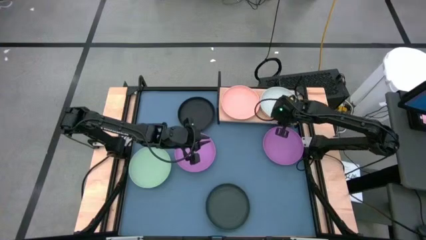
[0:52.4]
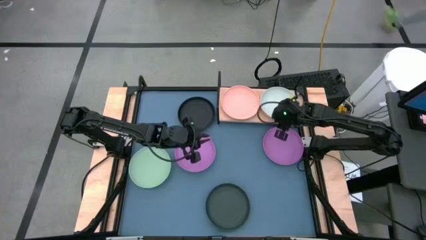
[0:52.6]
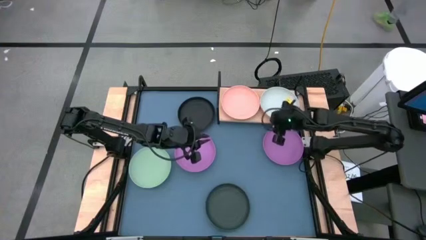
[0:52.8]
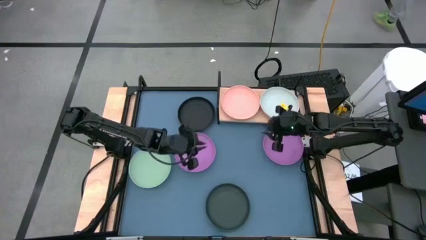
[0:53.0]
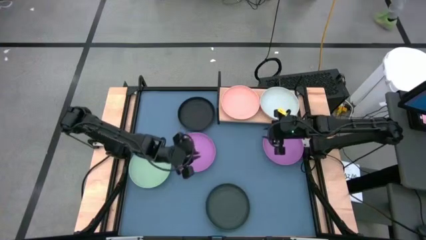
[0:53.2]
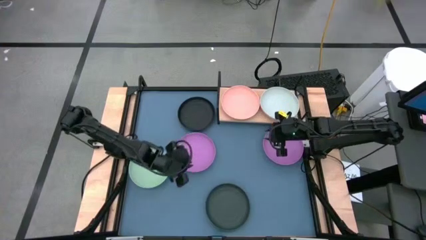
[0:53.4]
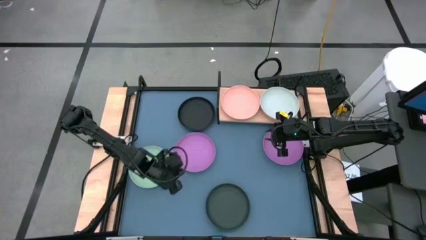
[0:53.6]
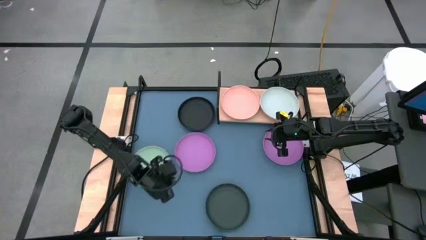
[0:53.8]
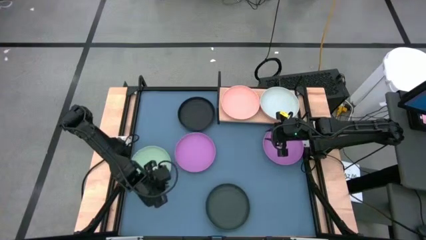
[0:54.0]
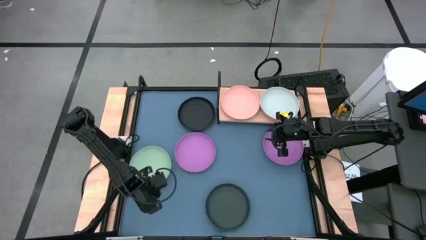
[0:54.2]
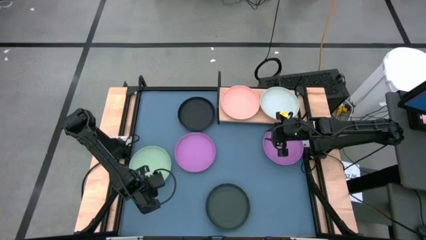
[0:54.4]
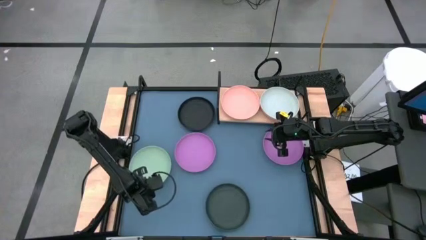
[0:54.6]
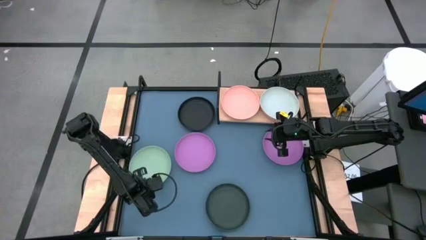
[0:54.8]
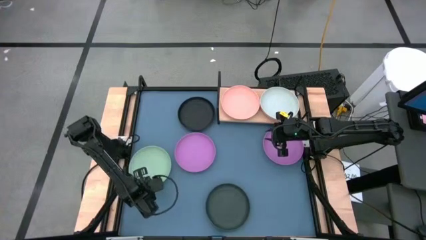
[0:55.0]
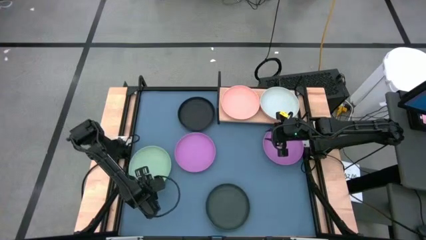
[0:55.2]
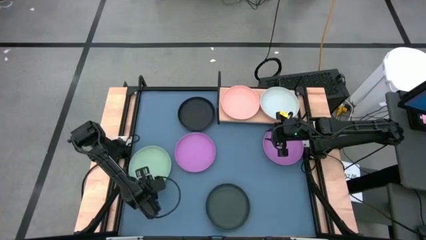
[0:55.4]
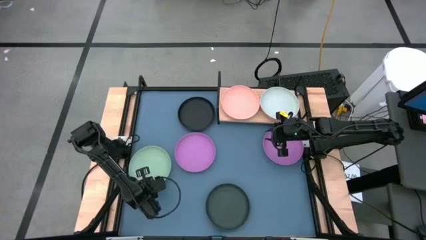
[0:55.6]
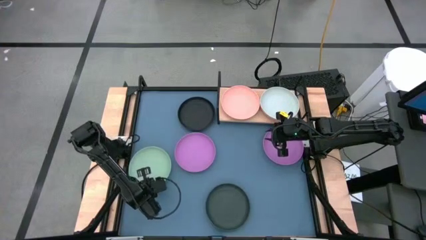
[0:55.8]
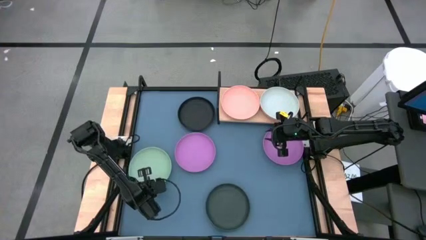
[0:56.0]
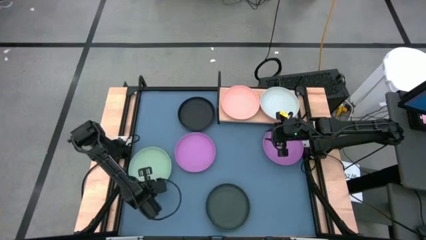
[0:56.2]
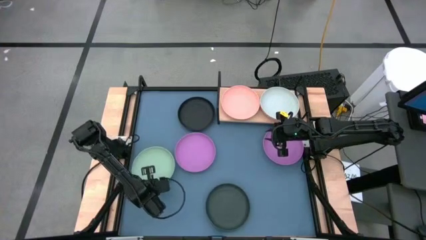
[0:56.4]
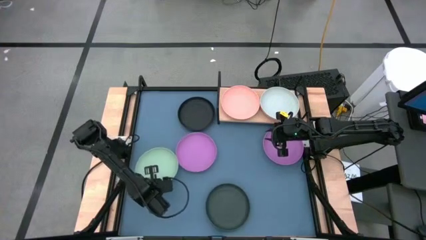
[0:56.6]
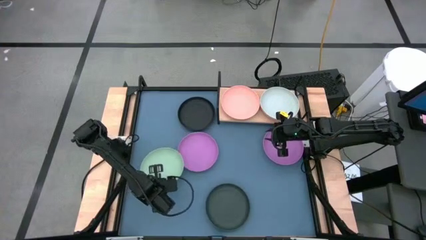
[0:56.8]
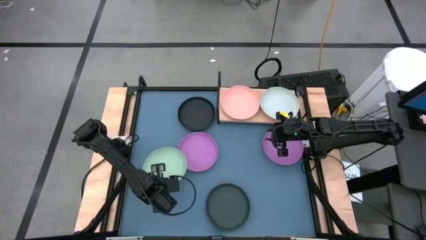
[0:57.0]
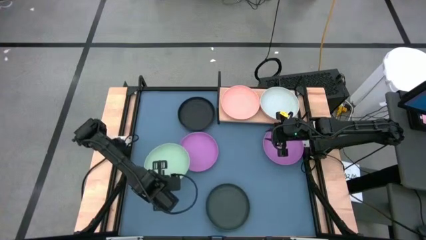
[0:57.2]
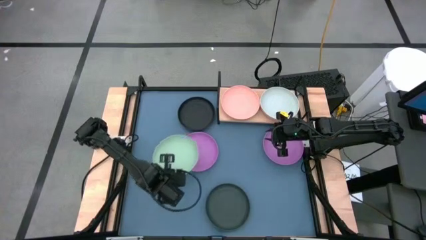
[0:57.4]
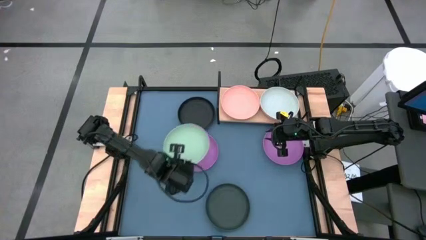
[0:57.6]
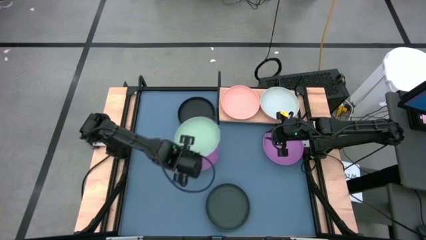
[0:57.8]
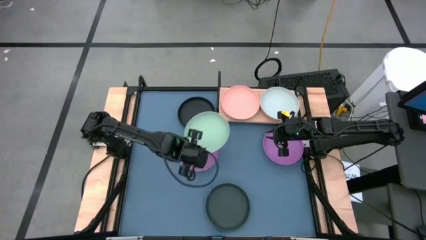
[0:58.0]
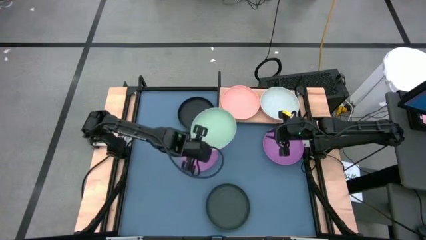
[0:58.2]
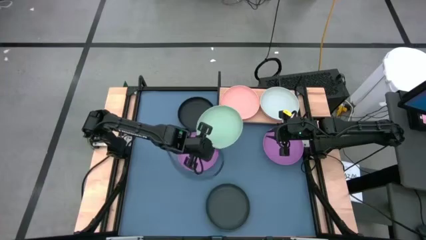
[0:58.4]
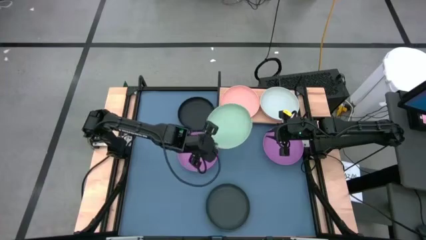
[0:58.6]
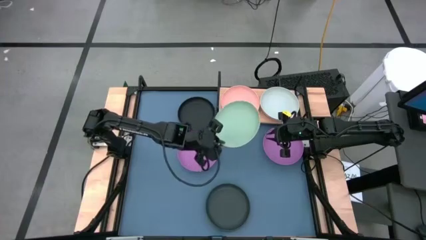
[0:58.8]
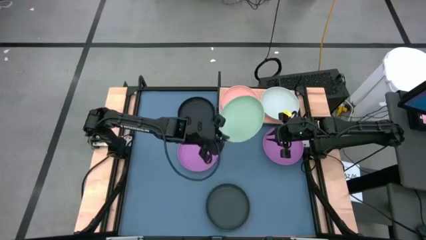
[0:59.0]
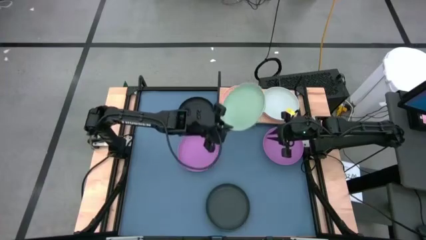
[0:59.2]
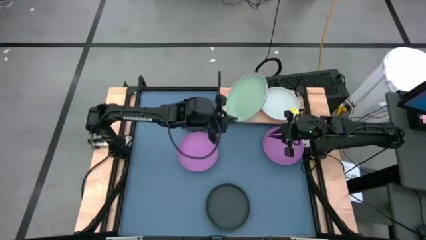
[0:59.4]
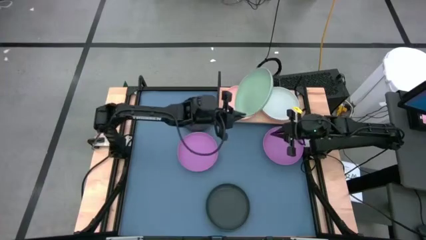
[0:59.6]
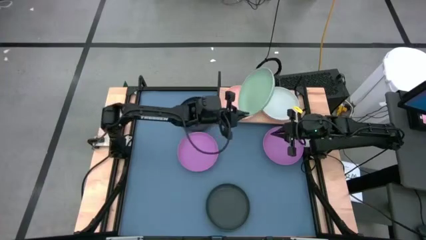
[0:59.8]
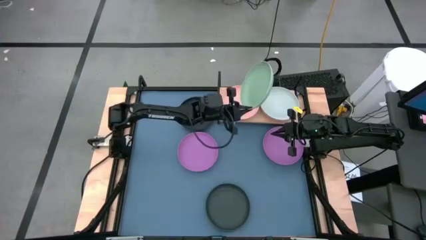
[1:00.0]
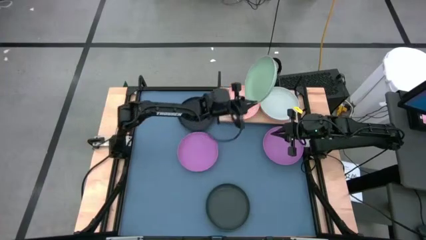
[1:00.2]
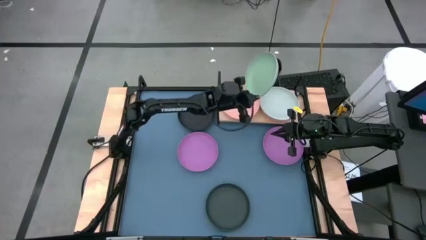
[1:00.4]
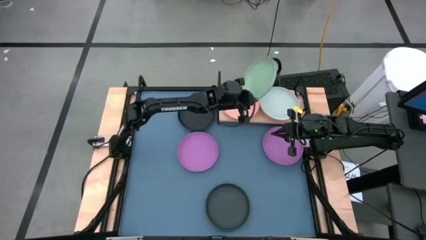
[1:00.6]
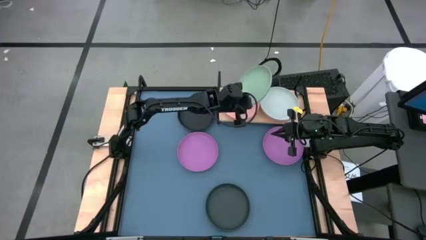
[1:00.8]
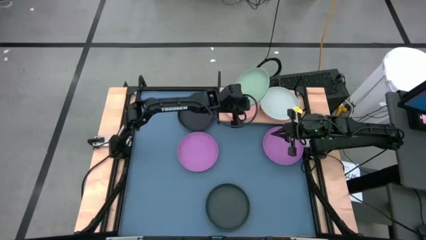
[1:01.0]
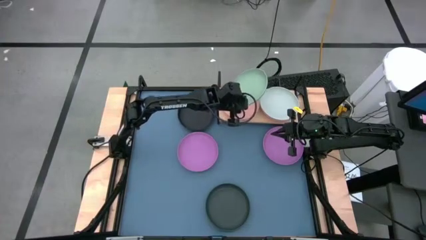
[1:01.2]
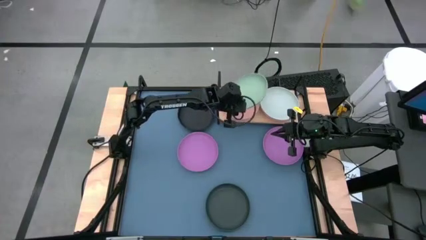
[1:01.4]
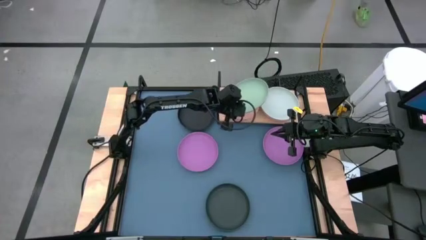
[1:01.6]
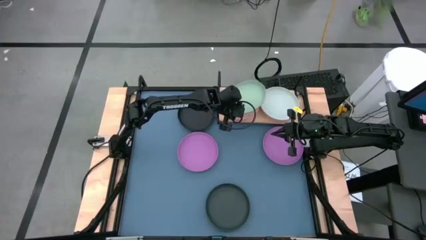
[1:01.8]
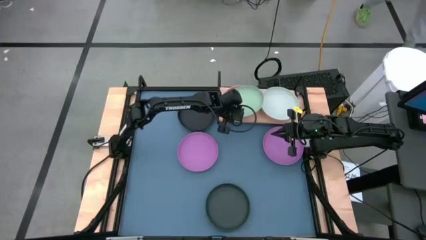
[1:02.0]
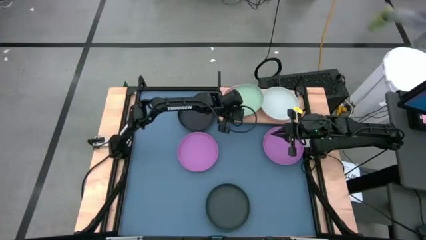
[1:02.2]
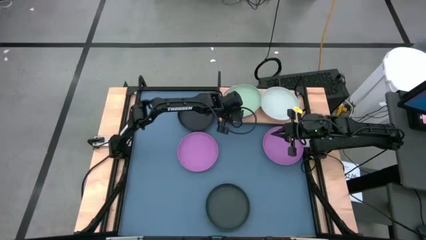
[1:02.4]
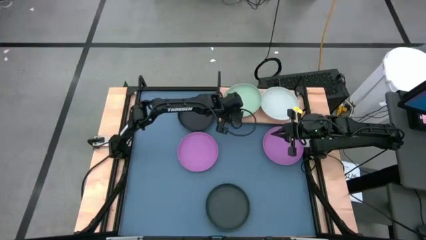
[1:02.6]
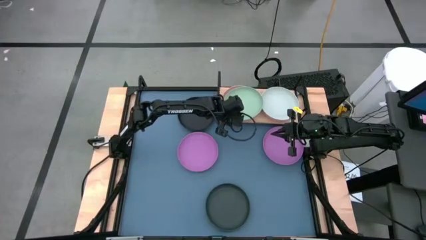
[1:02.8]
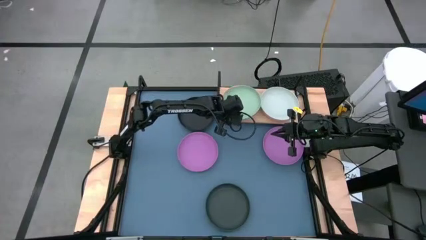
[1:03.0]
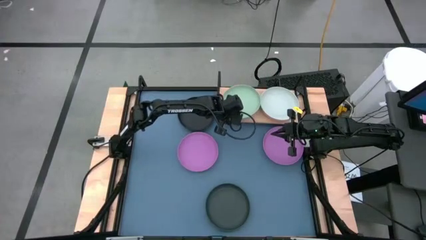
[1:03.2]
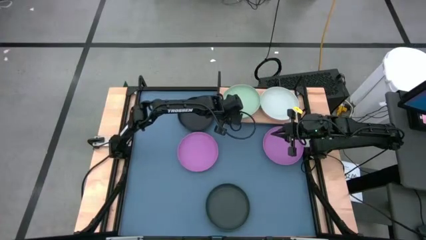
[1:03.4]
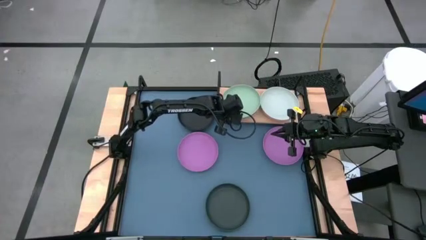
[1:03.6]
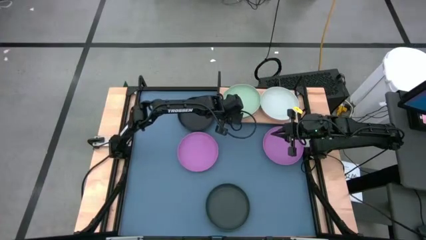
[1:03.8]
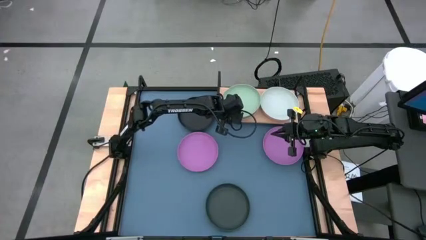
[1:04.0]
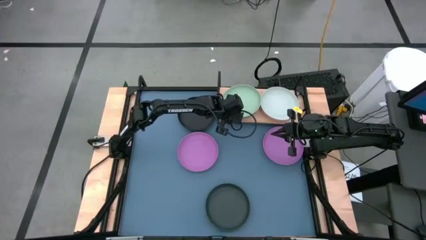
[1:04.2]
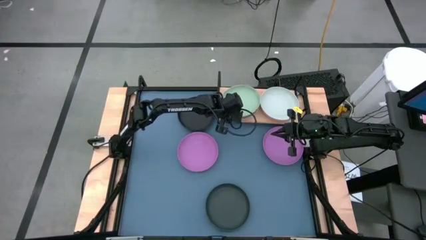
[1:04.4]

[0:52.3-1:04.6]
Task: Place and stack plates onto a shelf
Stack the green plate on top of the pink plate on the shelf
